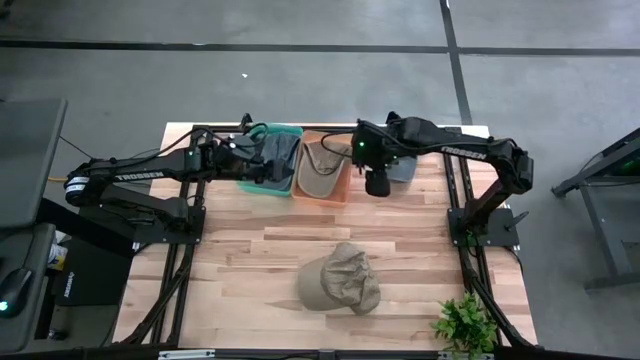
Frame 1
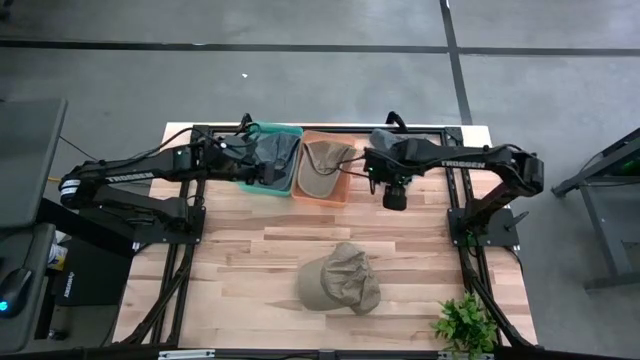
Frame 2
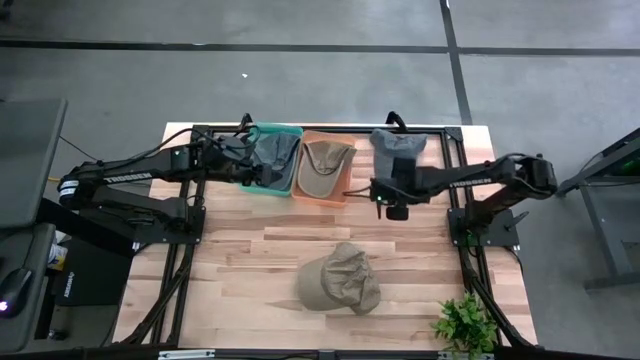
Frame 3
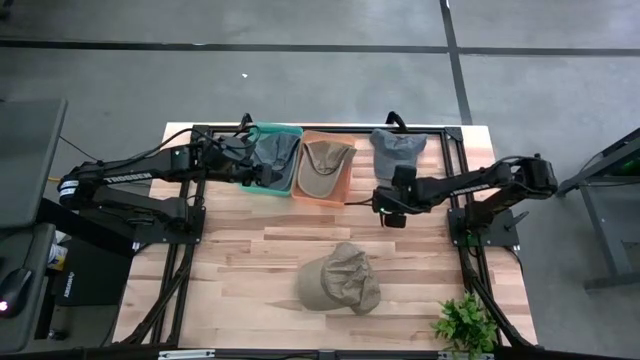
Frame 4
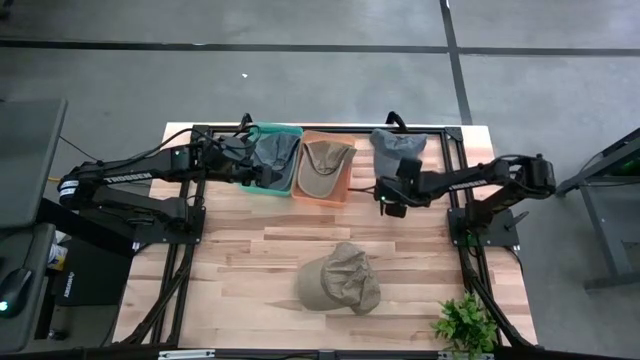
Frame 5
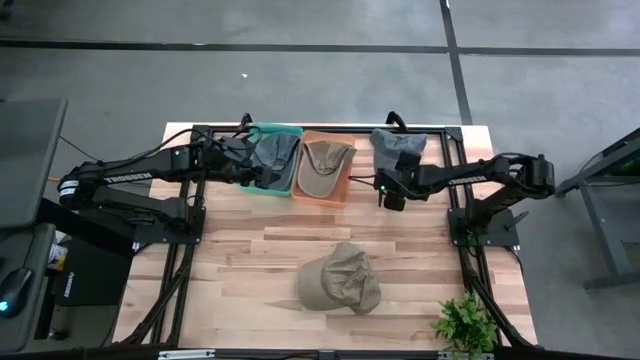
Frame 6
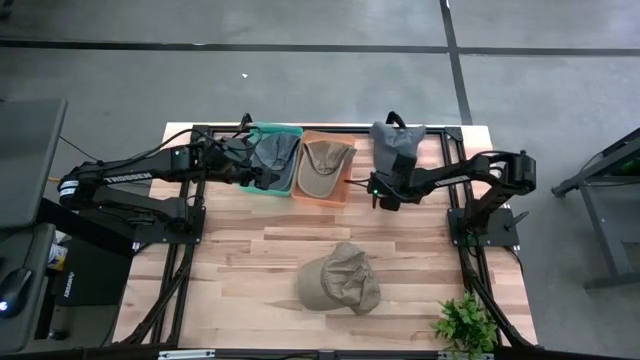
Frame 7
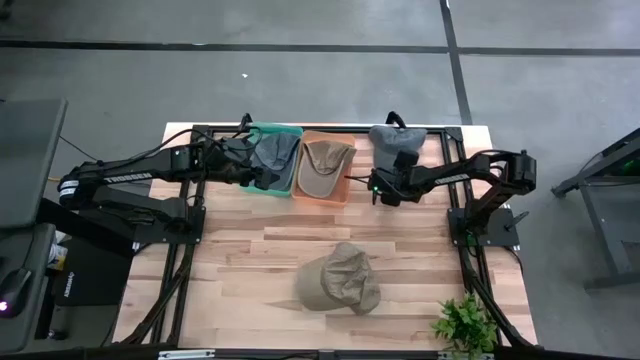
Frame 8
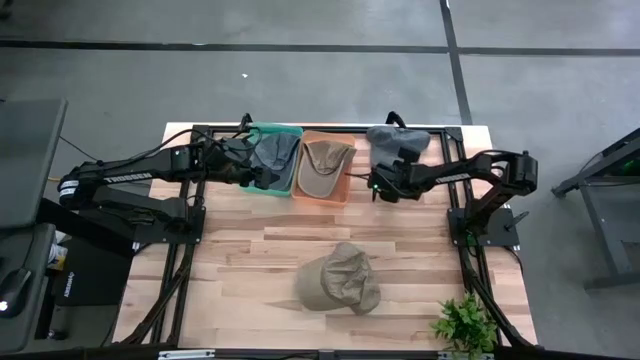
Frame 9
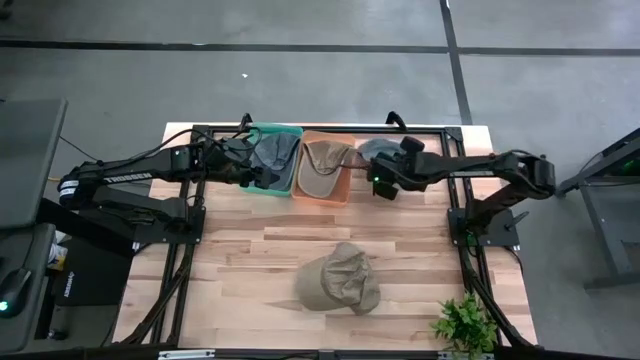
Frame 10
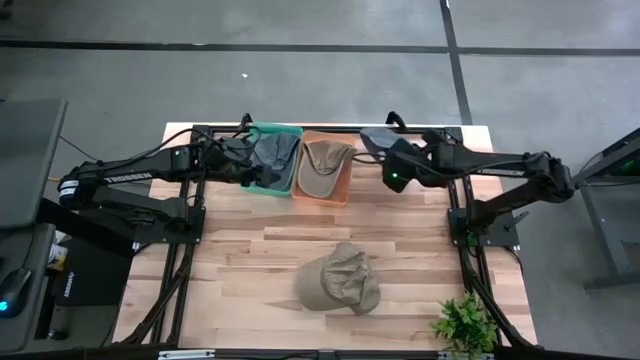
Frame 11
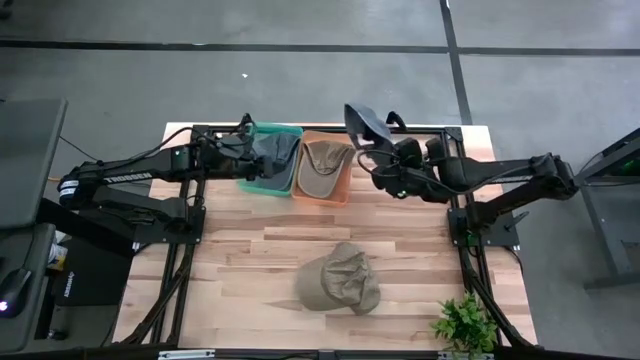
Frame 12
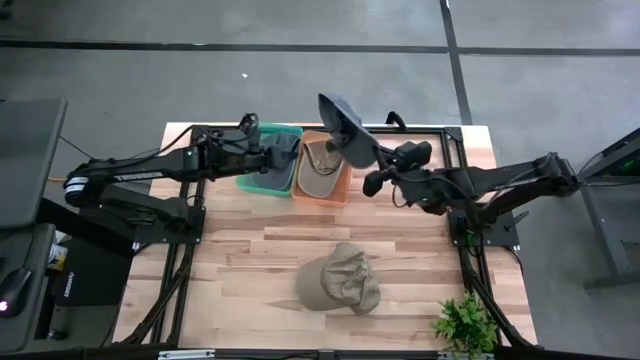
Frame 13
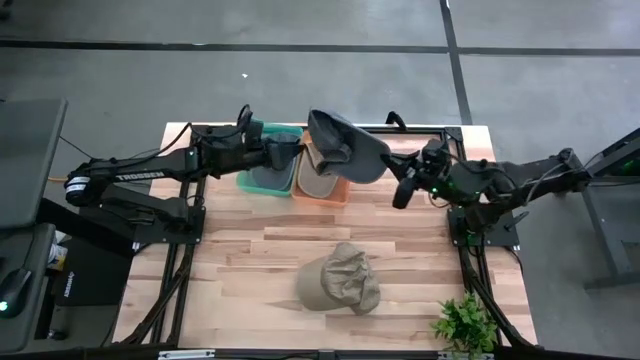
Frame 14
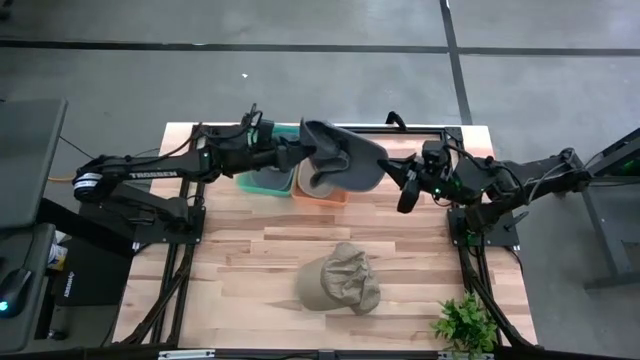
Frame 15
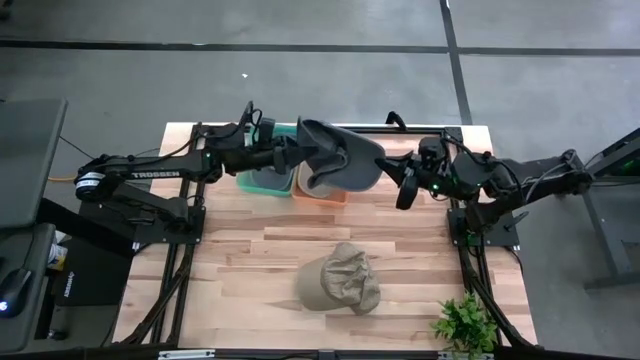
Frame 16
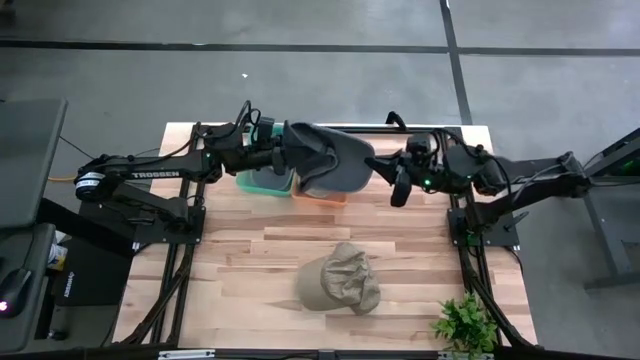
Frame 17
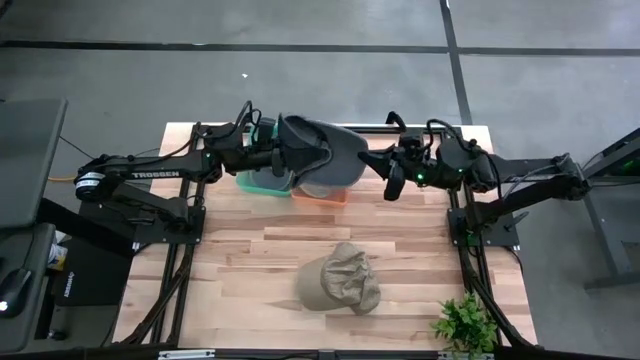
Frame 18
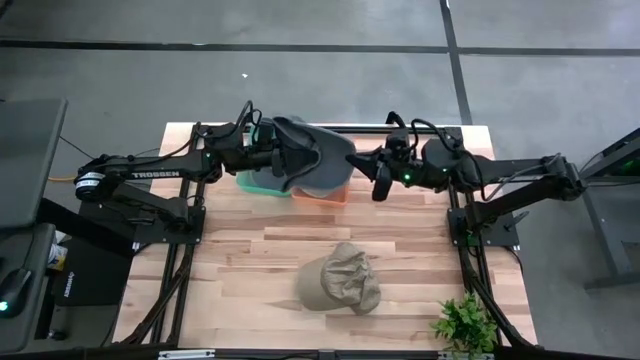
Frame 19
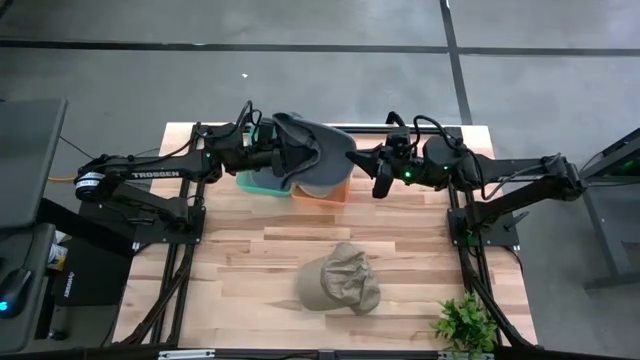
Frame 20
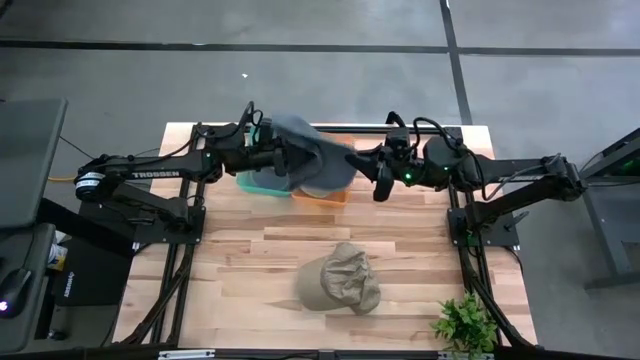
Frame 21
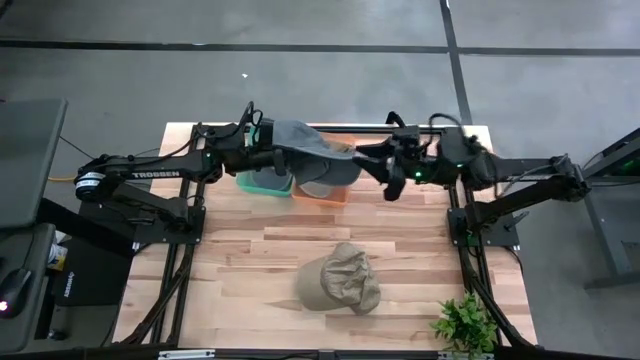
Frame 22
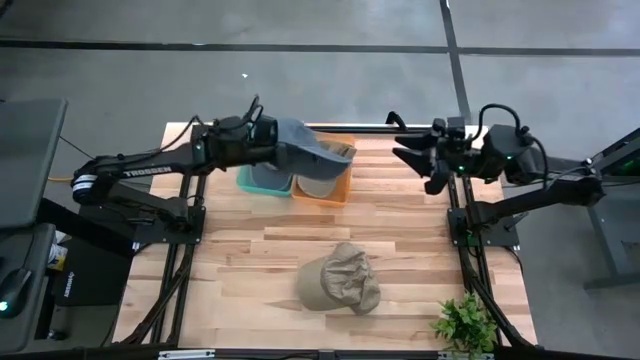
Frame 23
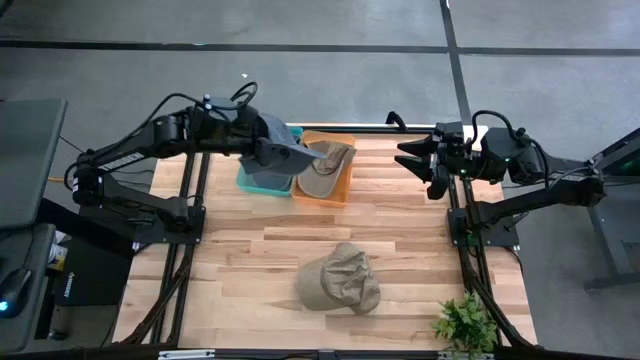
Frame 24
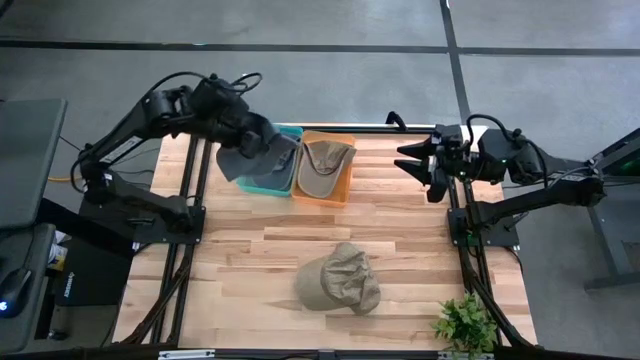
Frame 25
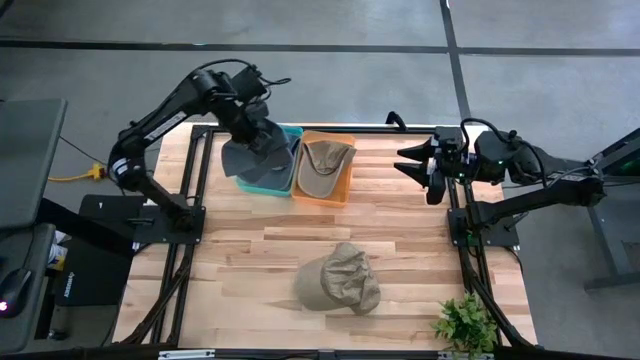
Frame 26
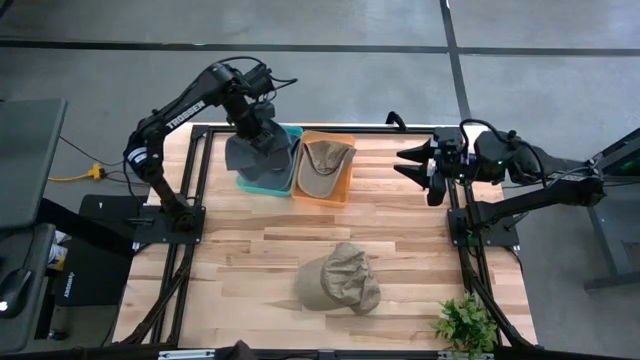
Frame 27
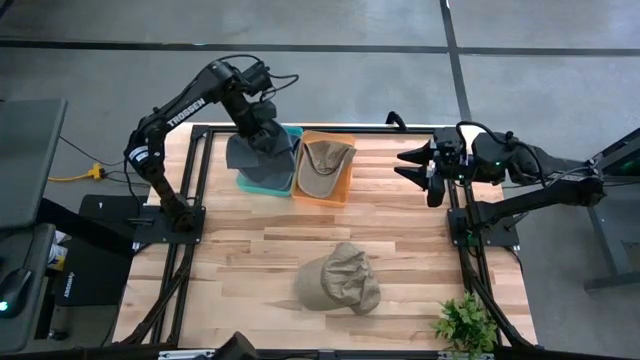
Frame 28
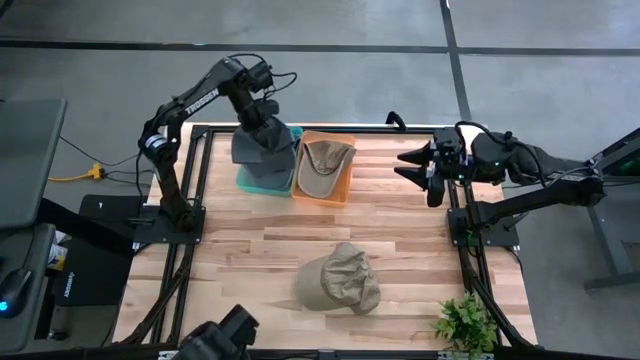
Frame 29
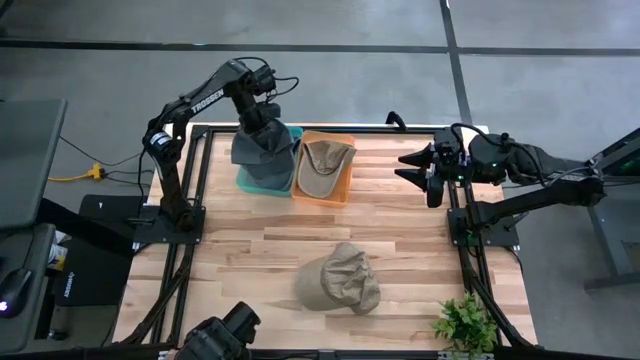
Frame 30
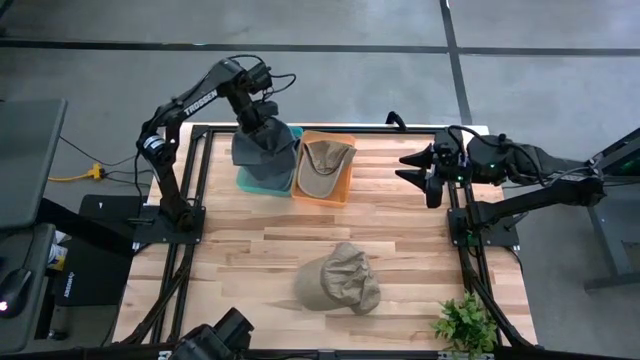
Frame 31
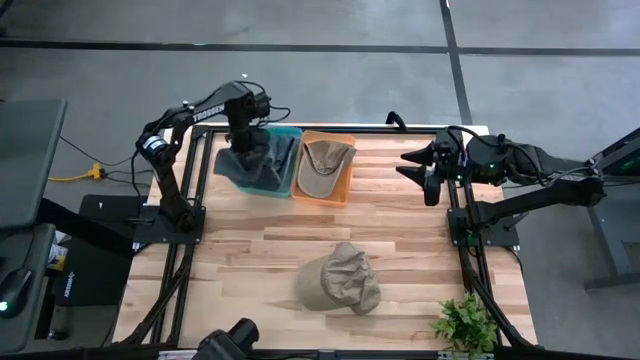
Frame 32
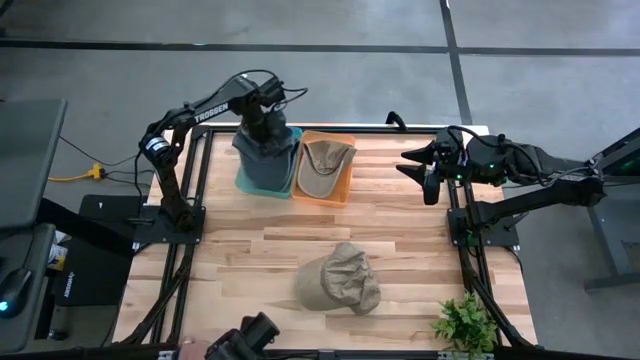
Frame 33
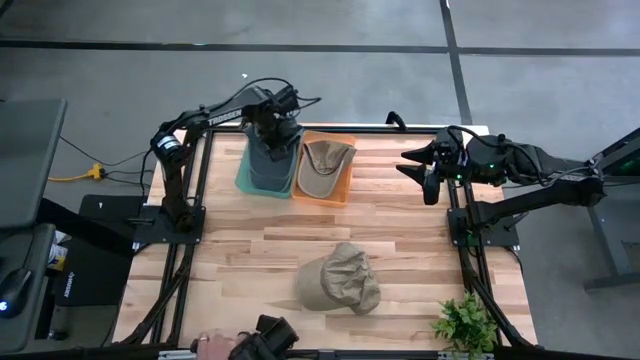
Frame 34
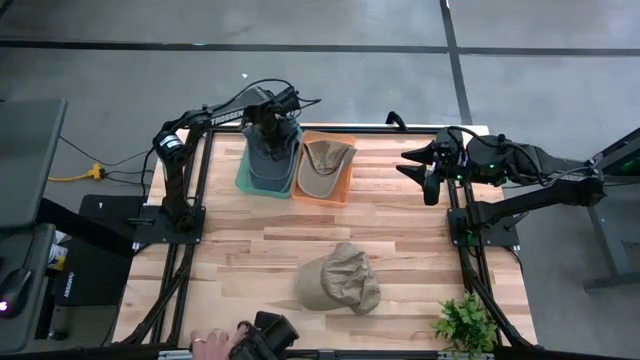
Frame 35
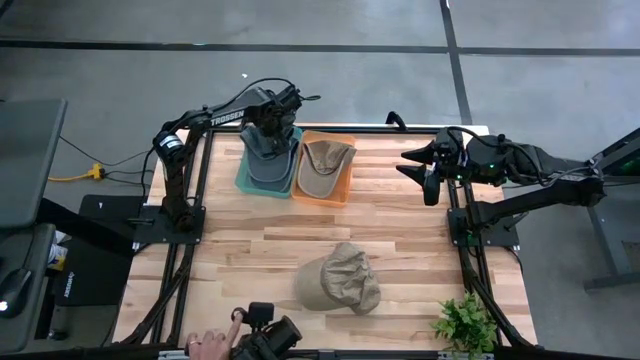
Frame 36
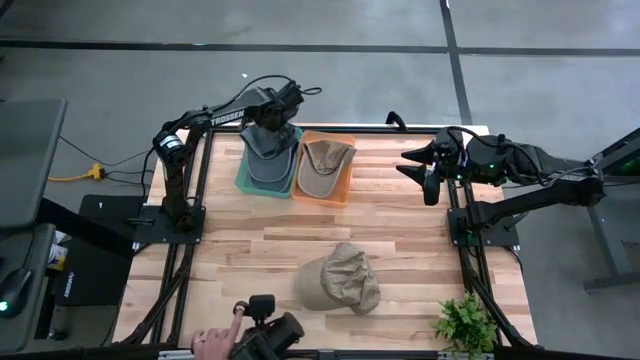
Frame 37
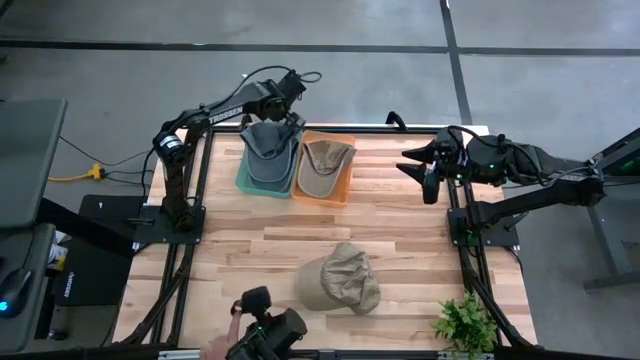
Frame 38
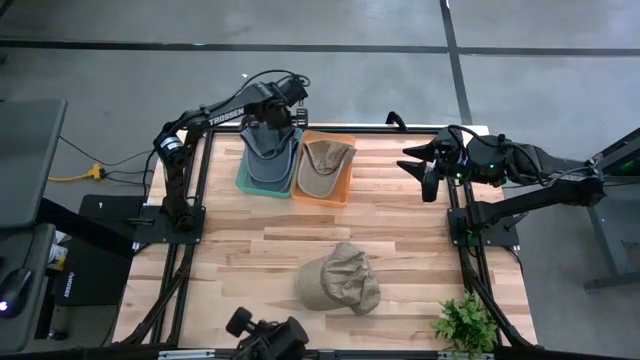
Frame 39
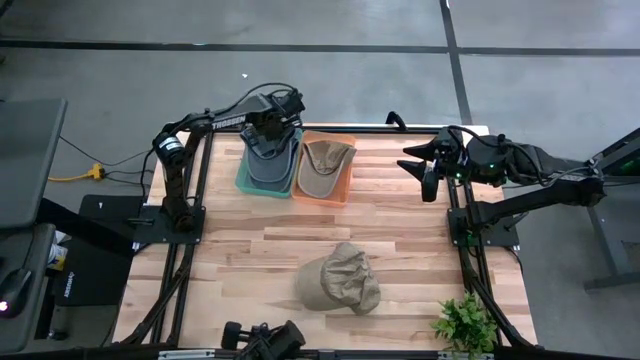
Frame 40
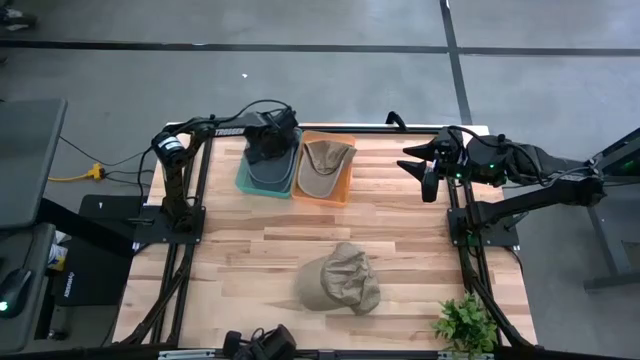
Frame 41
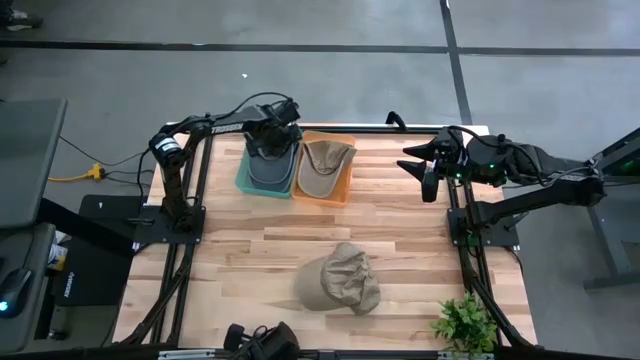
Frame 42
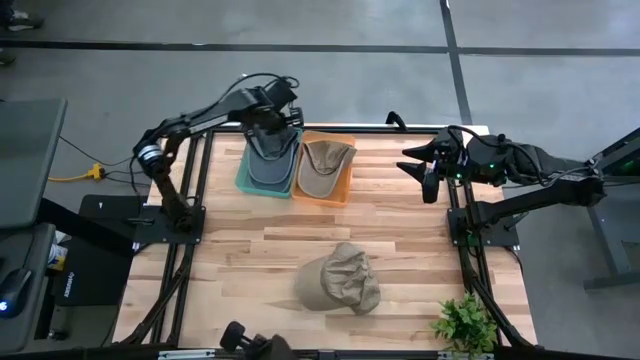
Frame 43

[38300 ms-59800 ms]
Task: Pick & Place hat
Put the blue cap into the green bin
